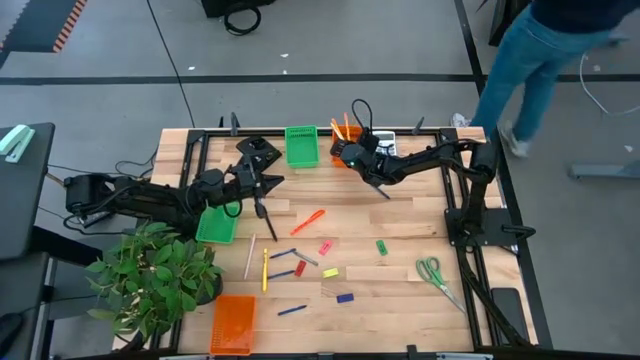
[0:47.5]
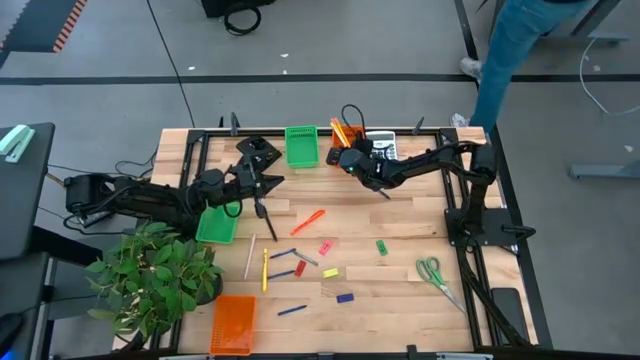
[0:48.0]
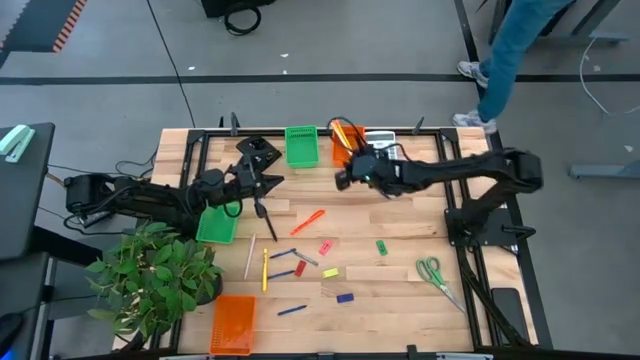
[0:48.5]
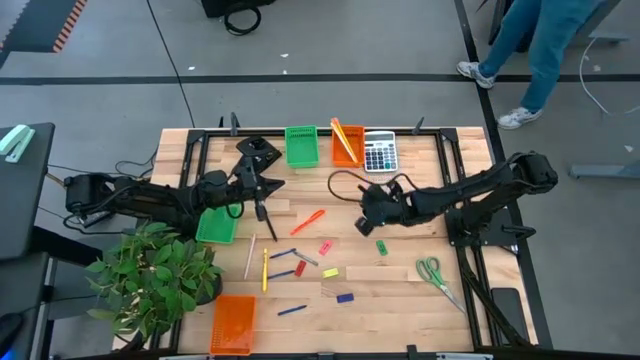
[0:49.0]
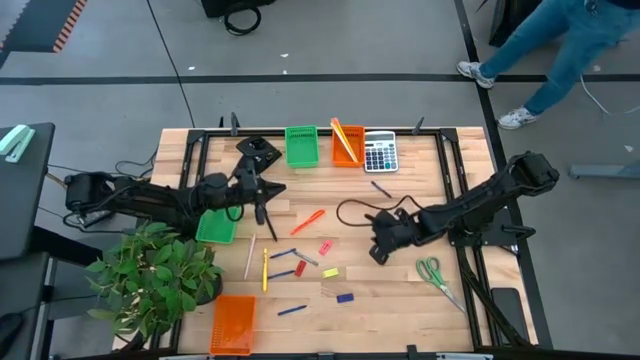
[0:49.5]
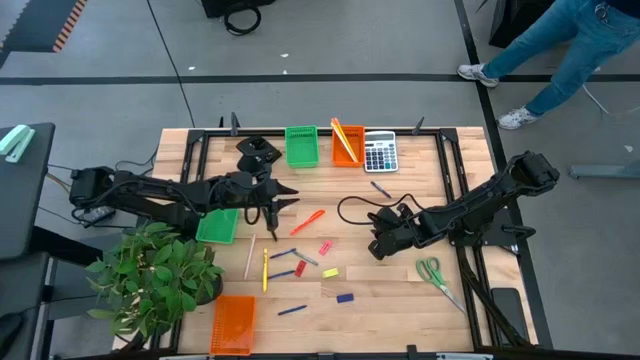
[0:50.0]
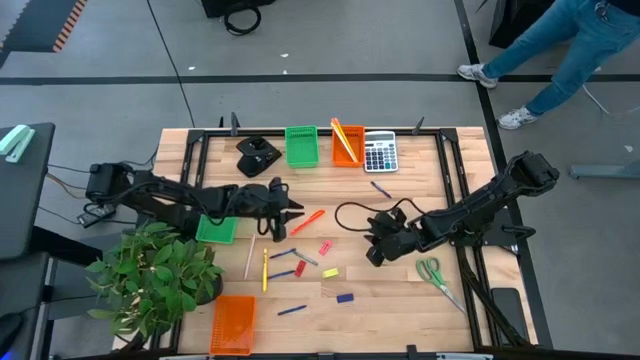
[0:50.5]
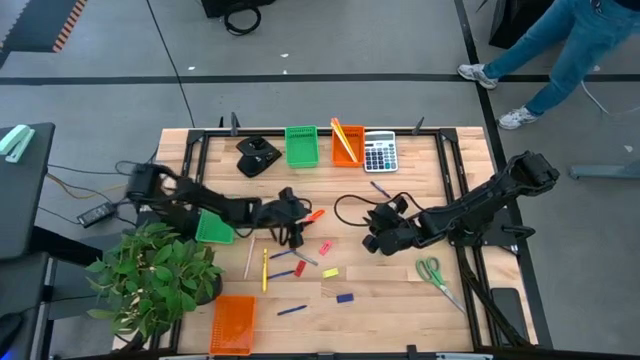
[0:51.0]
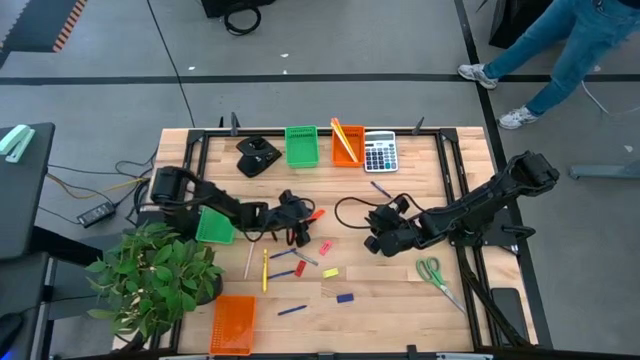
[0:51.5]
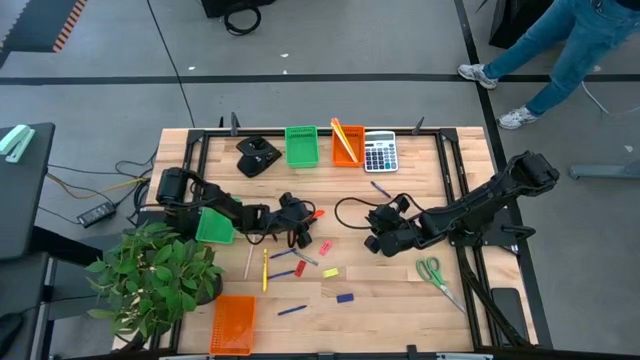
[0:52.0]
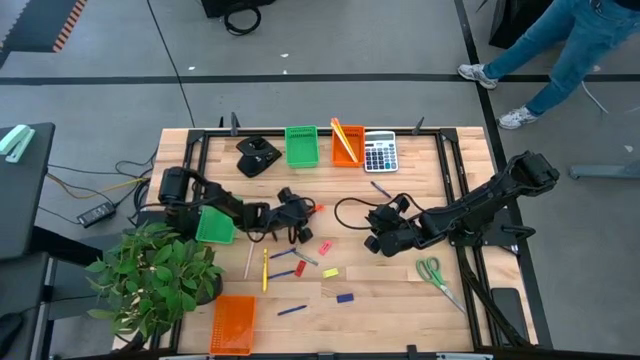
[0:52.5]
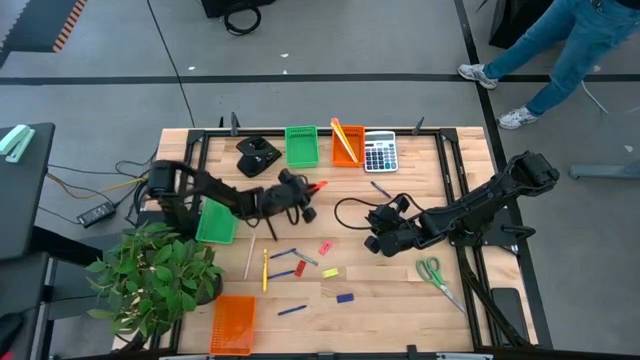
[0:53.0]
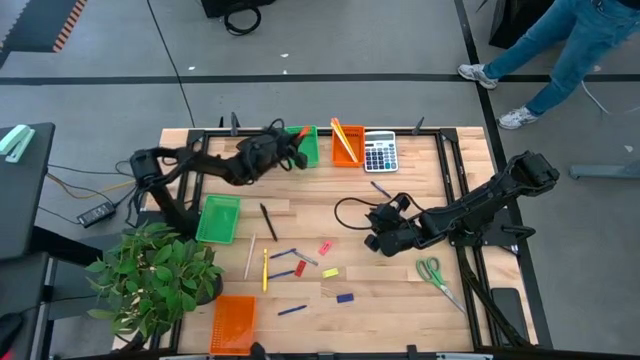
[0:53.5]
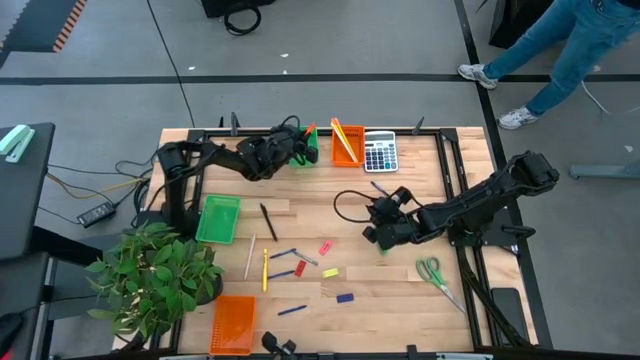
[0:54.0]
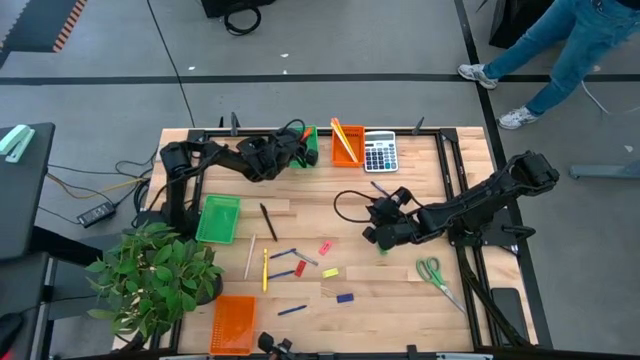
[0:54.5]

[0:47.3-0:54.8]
Task: Sort crayons/erasers/pens/pencils in bins
Put the orange pen into the top green bin

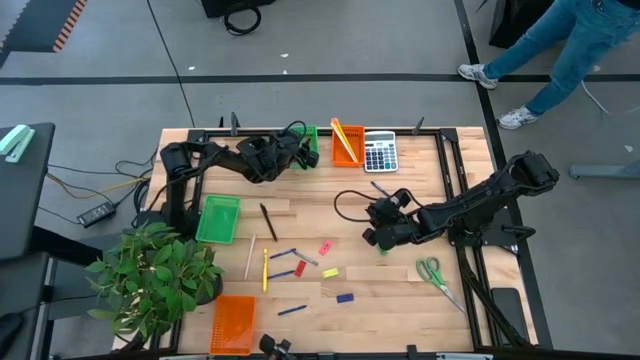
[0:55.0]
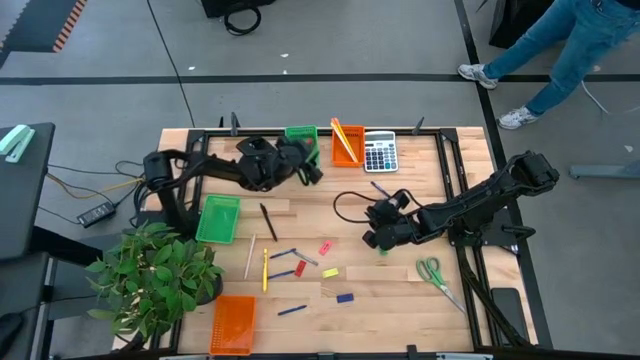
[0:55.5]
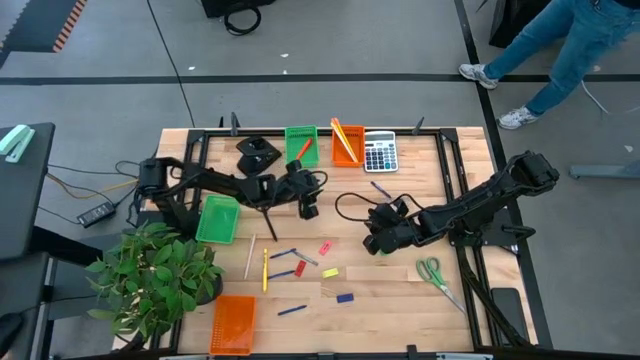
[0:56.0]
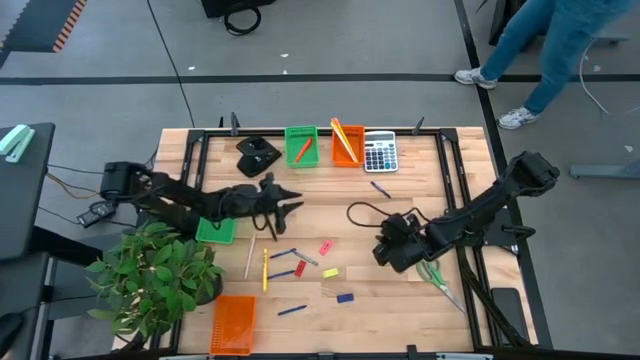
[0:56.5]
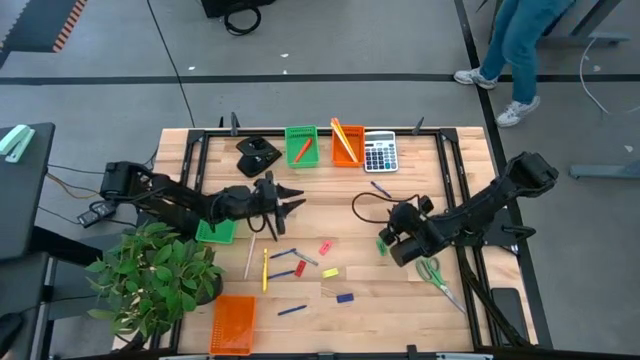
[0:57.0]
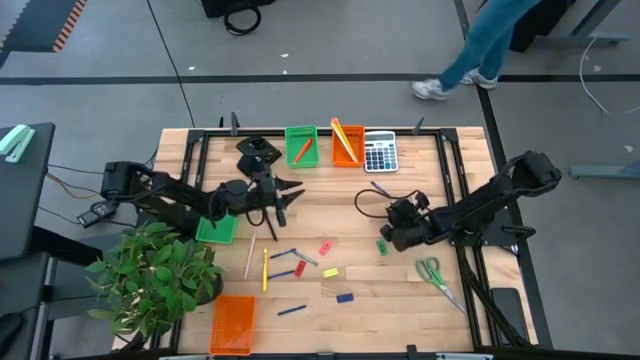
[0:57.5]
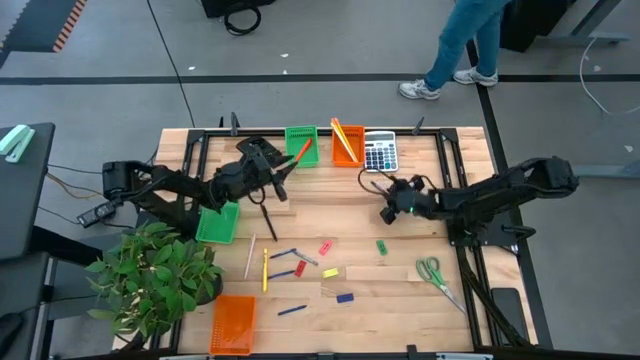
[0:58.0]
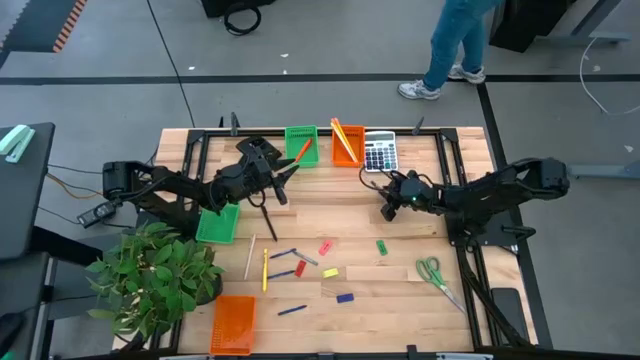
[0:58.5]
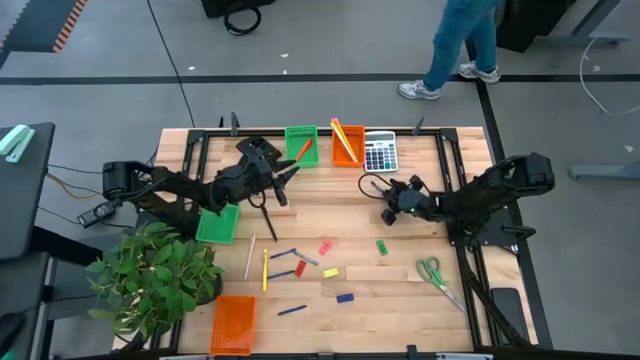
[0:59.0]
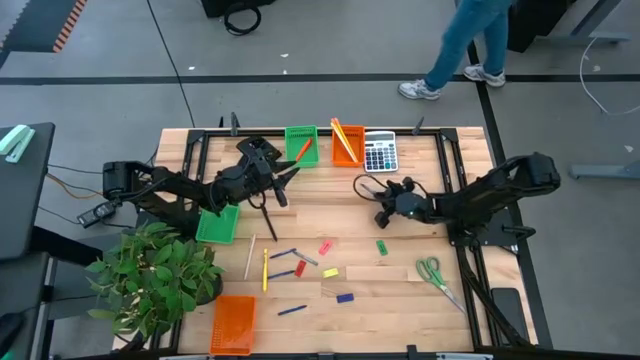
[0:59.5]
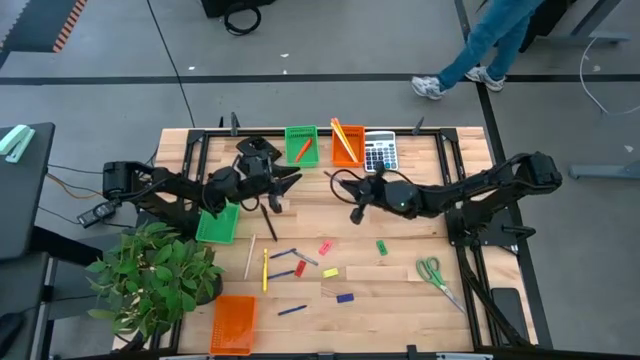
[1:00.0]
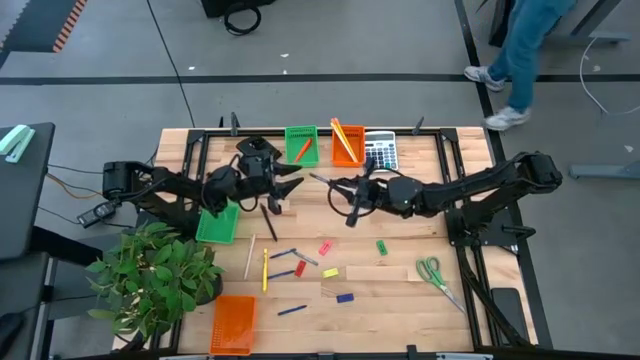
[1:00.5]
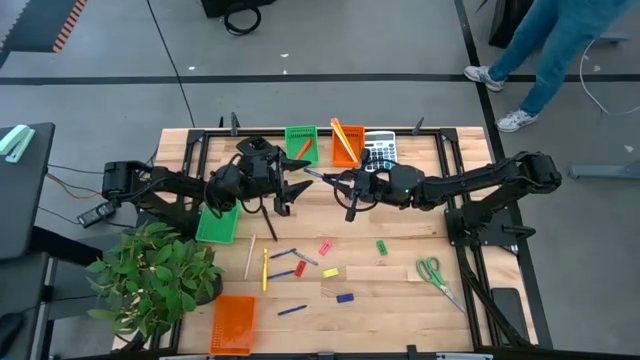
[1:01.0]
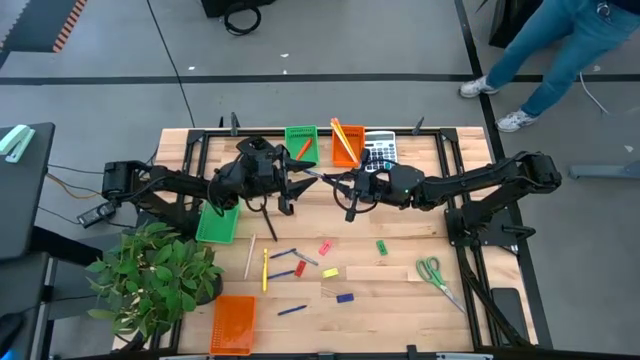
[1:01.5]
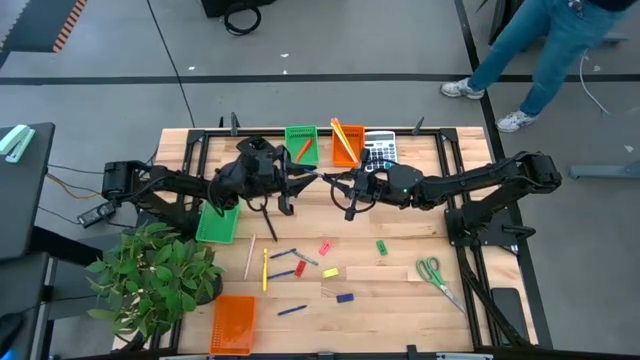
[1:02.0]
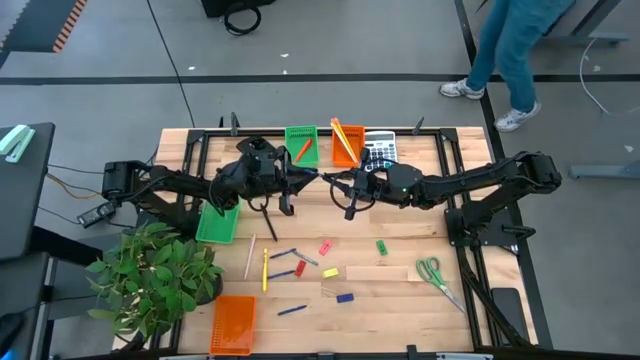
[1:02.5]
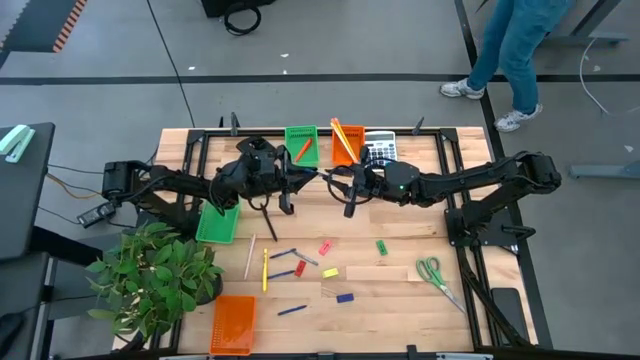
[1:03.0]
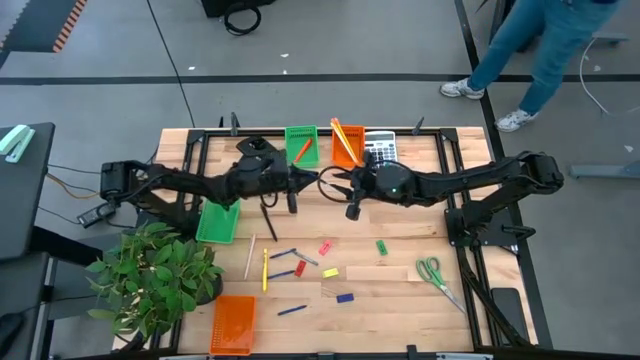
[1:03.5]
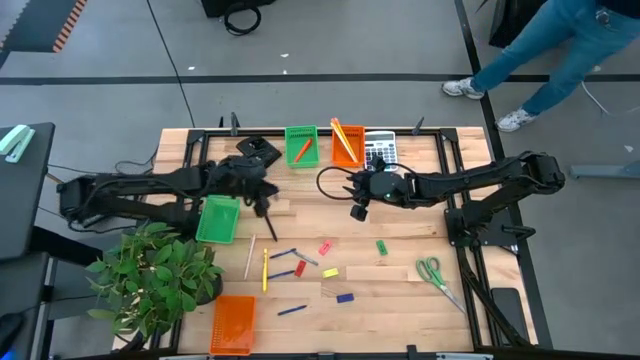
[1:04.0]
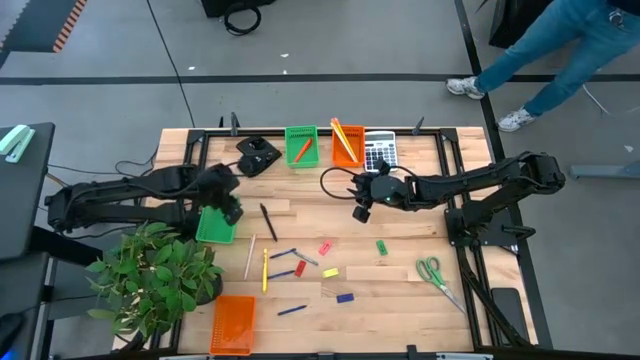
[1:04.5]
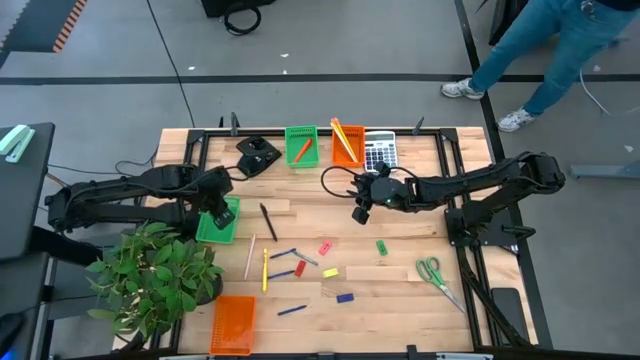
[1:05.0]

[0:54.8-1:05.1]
Put the blue crayon into the bottom green bin

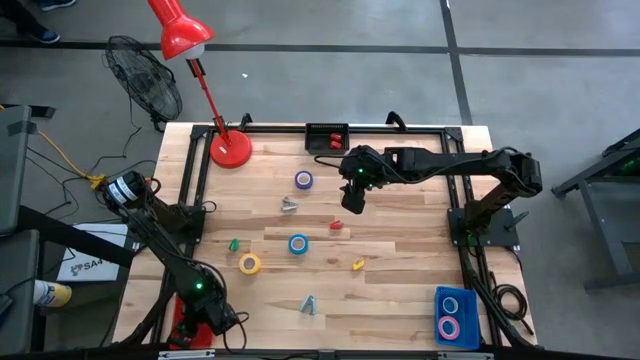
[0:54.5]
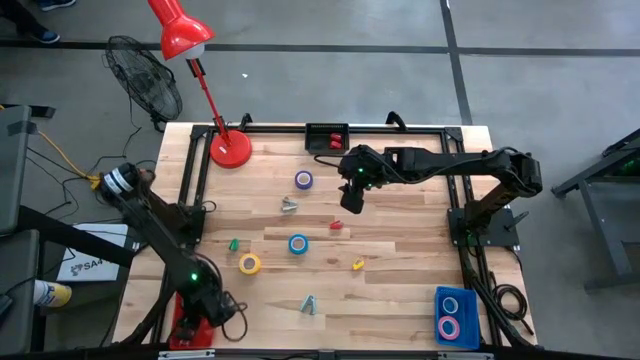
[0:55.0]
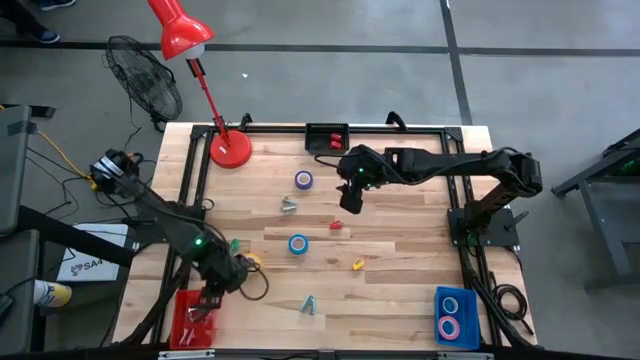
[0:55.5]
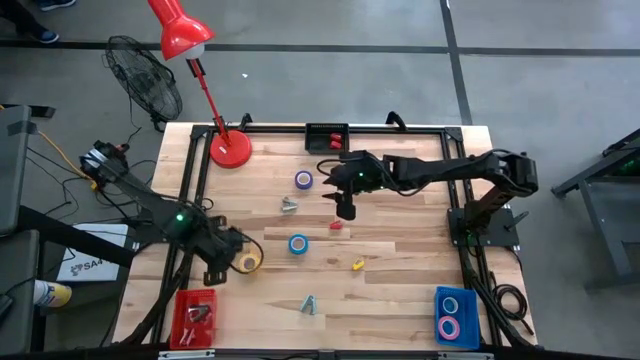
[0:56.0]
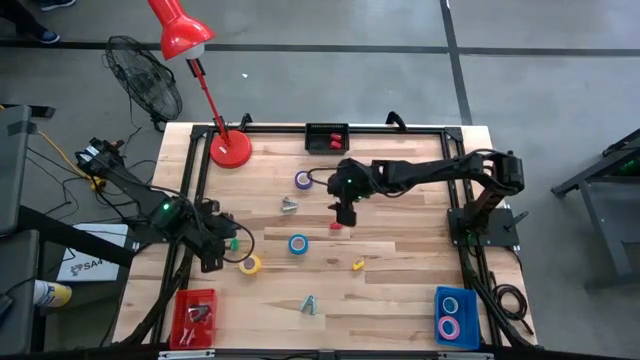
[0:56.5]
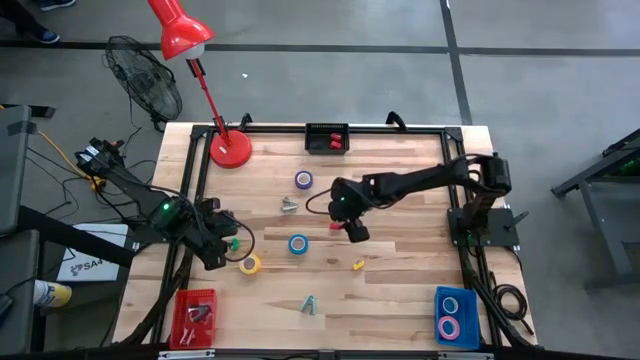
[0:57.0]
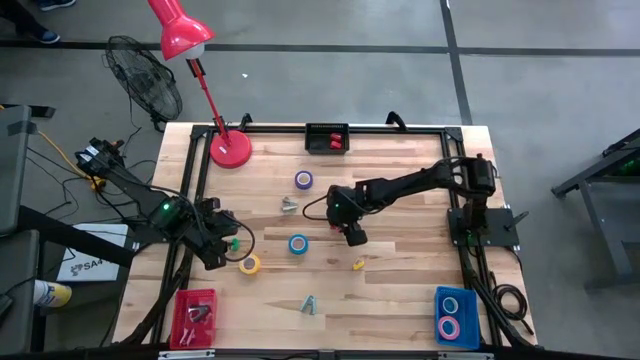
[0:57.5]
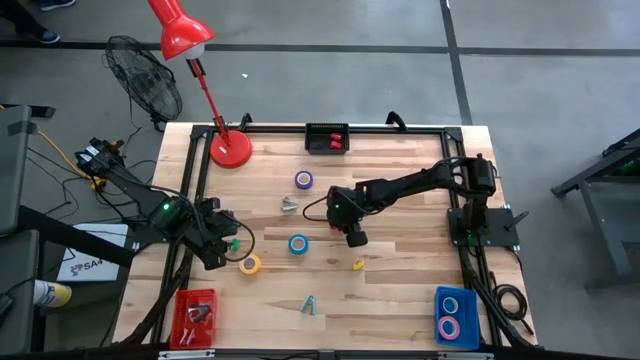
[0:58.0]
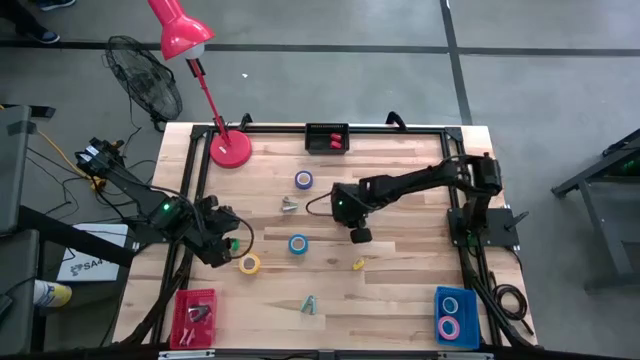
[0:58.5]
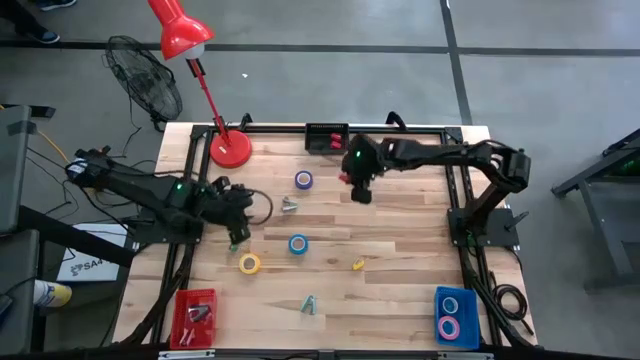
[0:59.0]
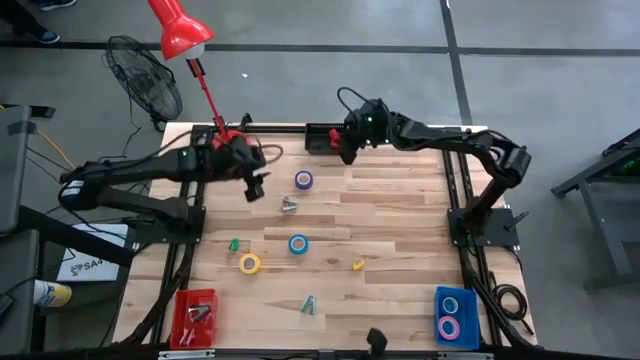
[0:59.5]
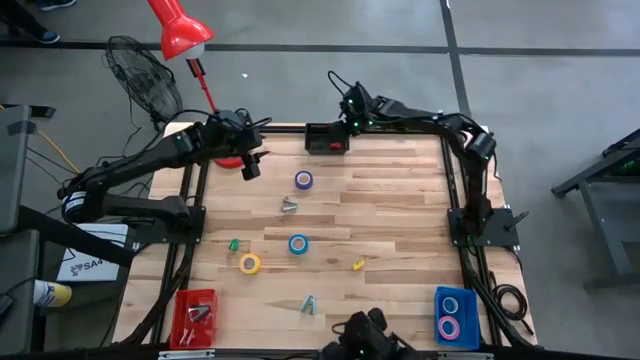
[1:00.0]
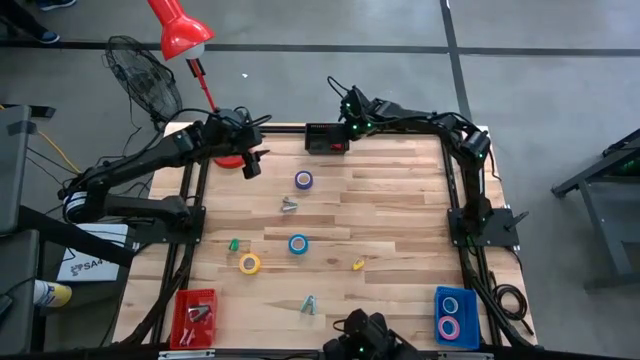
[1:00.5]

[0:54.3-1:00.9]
Task: Pick and place Stapler, Stapler remover, tape
Put the red stapler into the black basket
